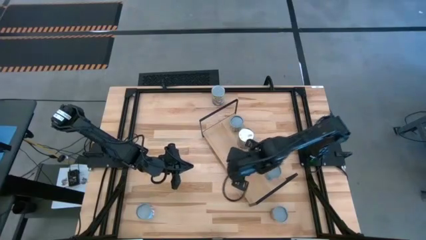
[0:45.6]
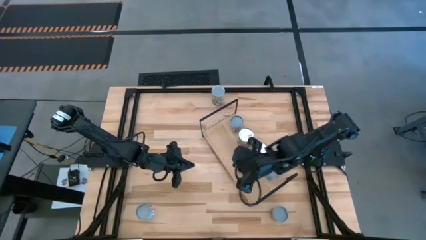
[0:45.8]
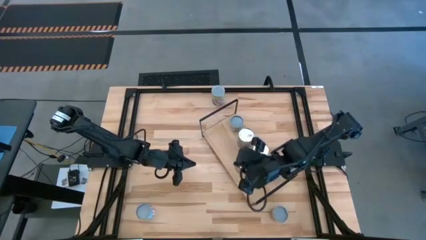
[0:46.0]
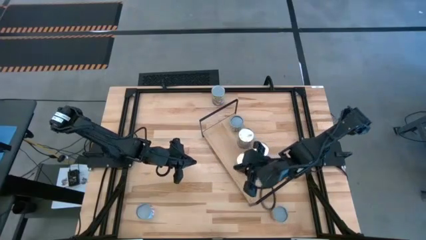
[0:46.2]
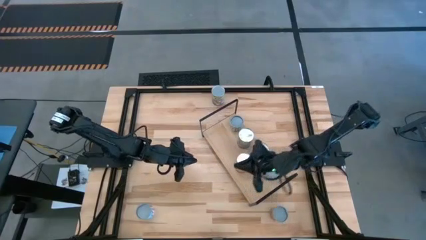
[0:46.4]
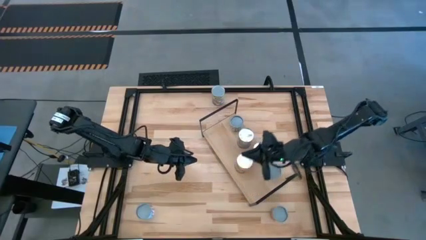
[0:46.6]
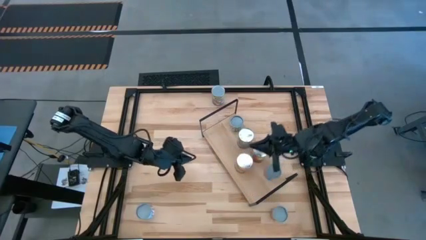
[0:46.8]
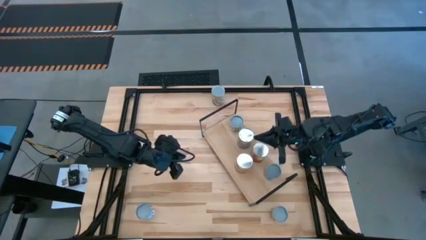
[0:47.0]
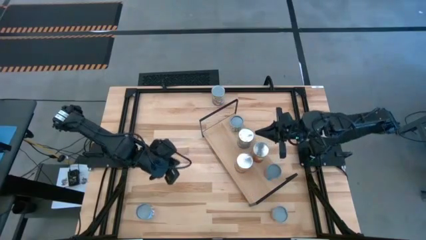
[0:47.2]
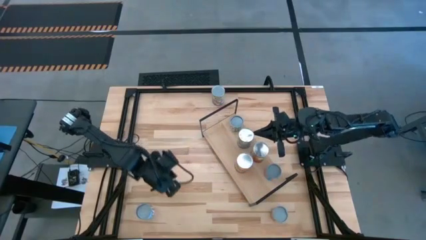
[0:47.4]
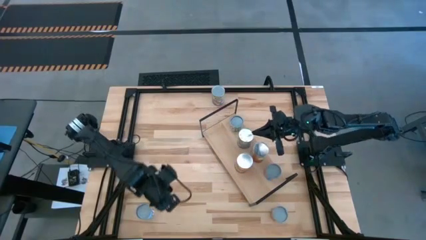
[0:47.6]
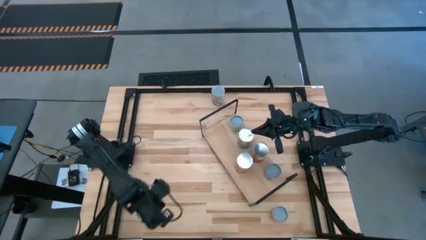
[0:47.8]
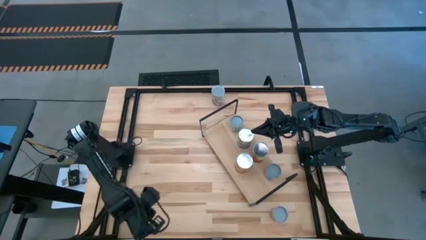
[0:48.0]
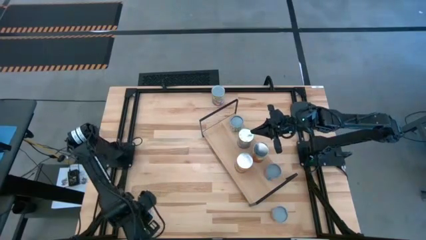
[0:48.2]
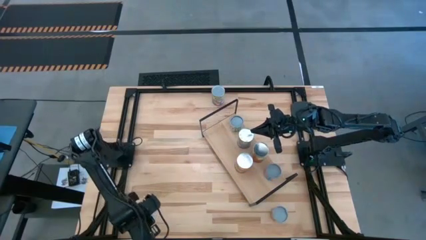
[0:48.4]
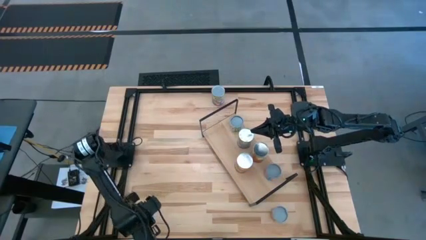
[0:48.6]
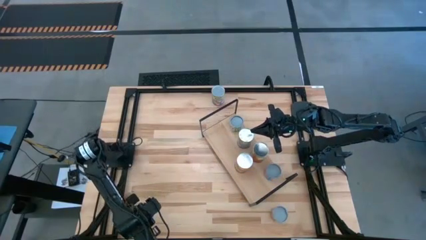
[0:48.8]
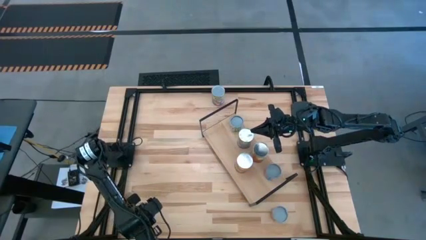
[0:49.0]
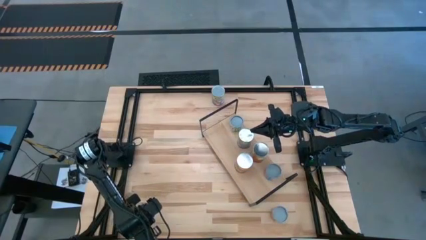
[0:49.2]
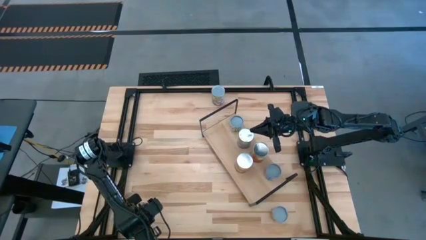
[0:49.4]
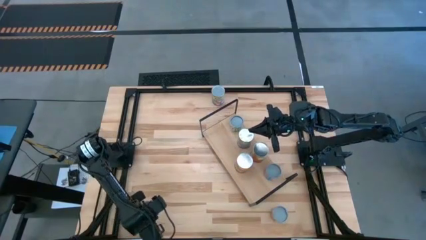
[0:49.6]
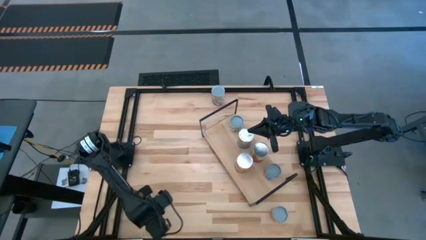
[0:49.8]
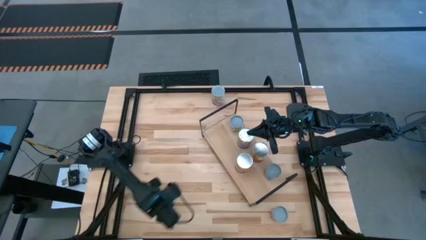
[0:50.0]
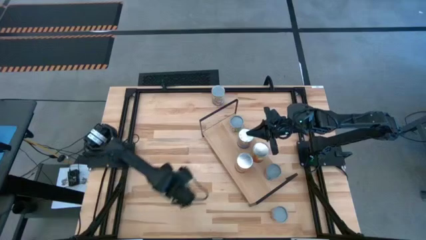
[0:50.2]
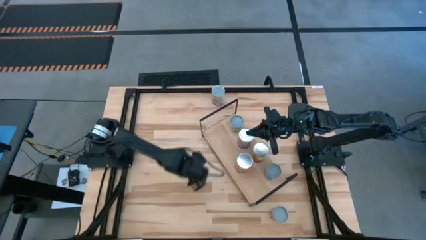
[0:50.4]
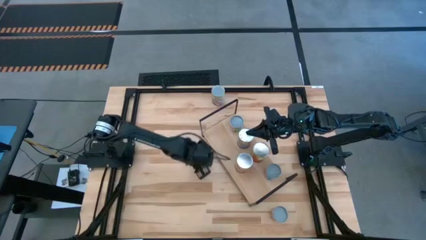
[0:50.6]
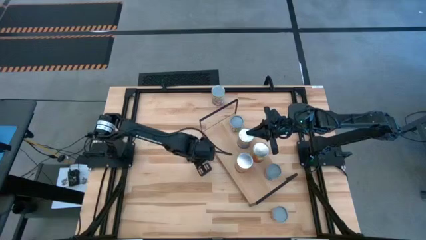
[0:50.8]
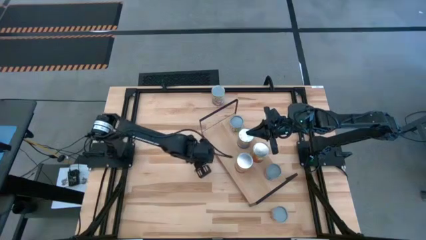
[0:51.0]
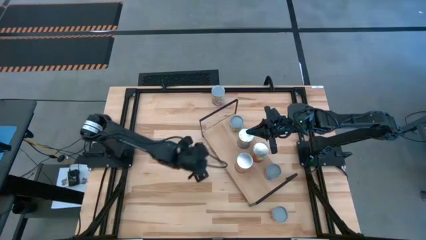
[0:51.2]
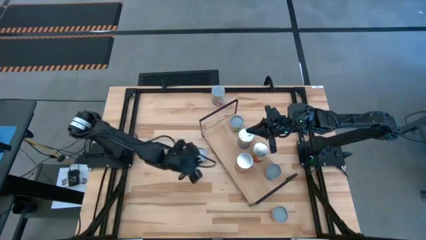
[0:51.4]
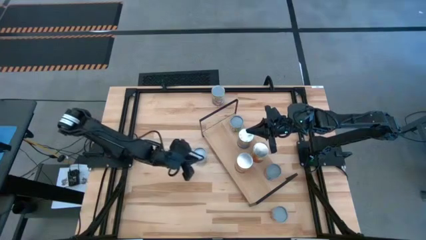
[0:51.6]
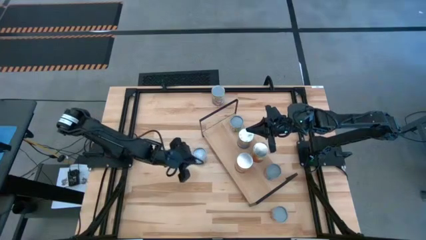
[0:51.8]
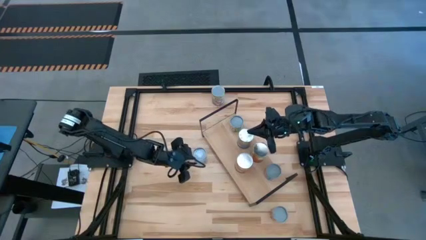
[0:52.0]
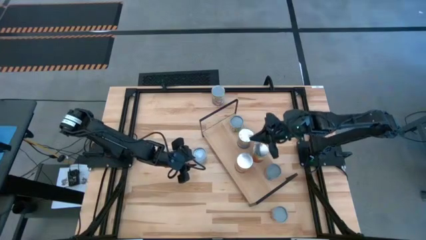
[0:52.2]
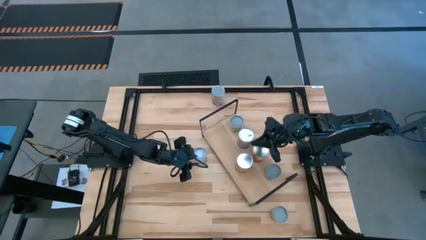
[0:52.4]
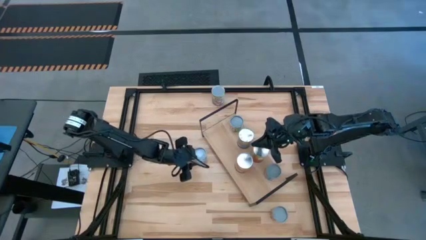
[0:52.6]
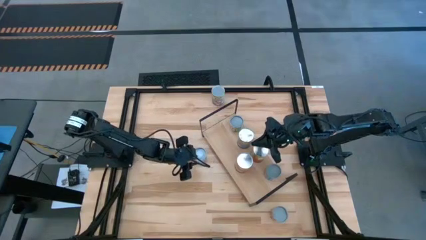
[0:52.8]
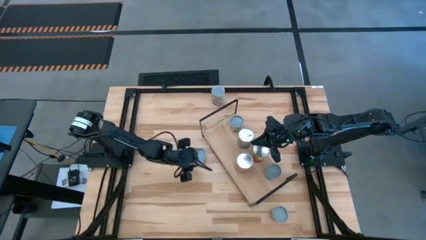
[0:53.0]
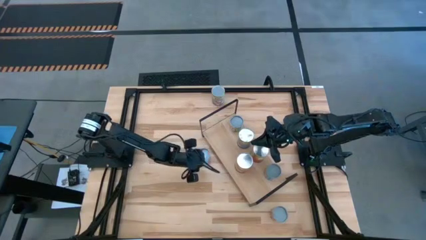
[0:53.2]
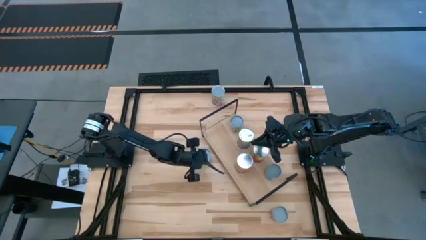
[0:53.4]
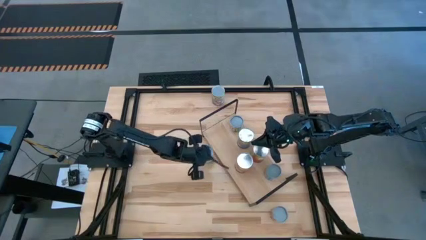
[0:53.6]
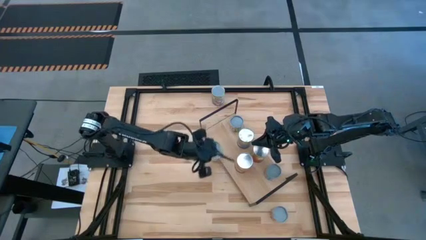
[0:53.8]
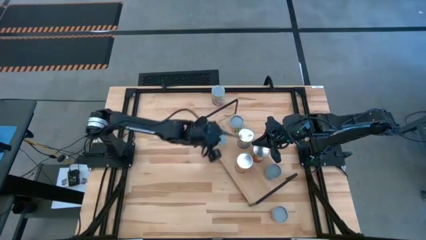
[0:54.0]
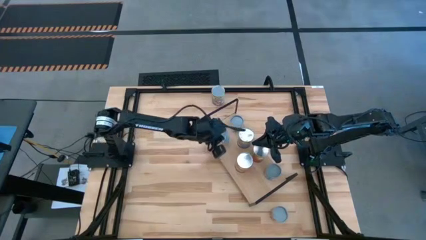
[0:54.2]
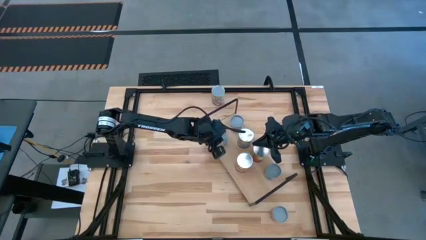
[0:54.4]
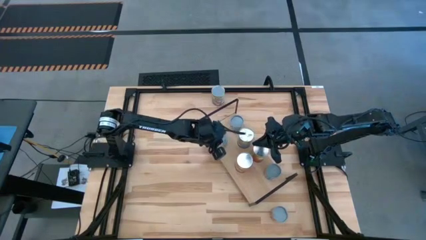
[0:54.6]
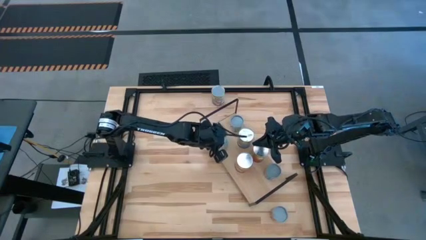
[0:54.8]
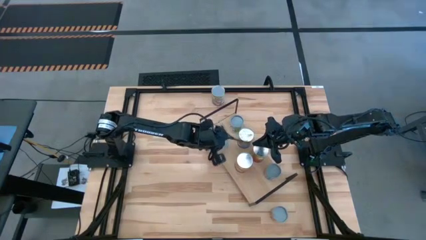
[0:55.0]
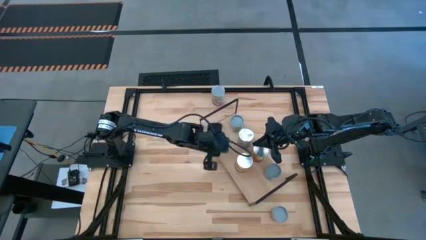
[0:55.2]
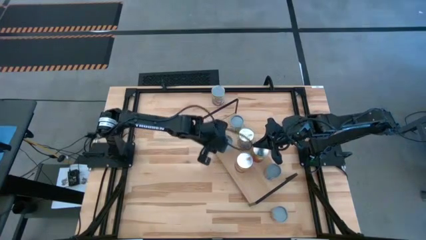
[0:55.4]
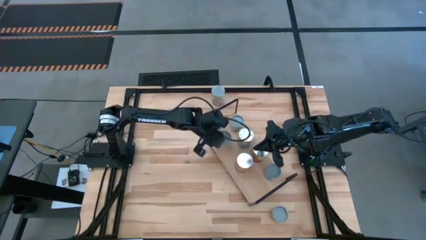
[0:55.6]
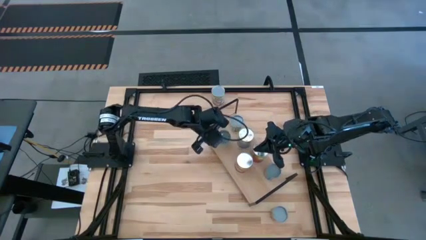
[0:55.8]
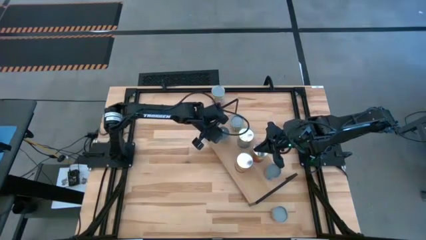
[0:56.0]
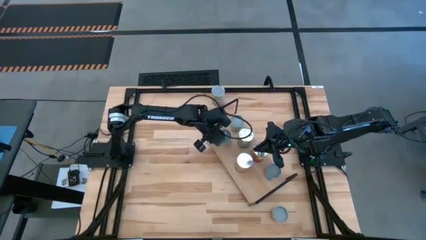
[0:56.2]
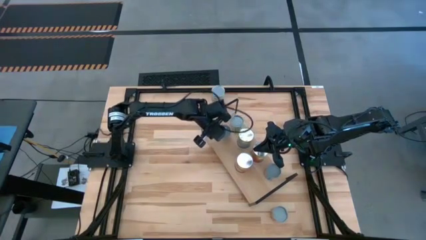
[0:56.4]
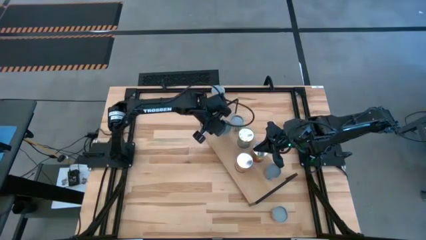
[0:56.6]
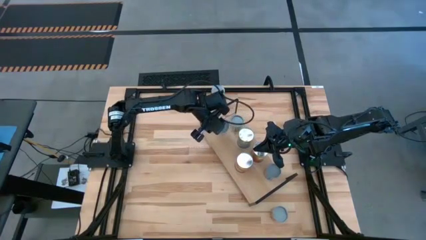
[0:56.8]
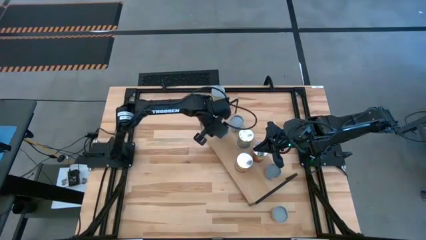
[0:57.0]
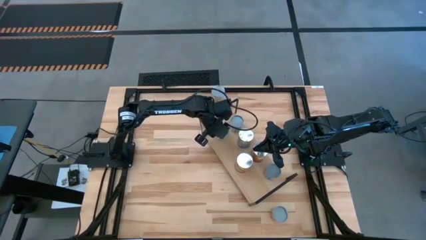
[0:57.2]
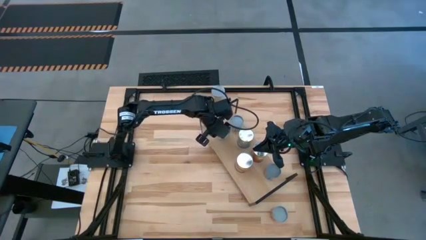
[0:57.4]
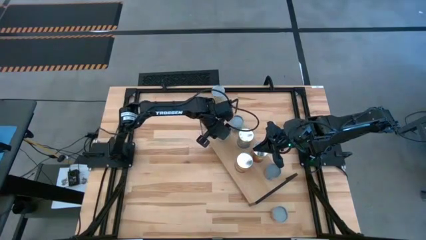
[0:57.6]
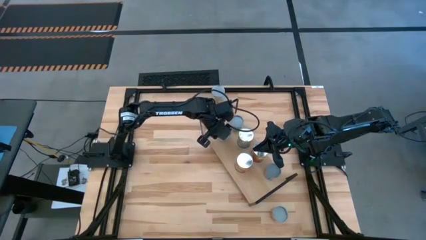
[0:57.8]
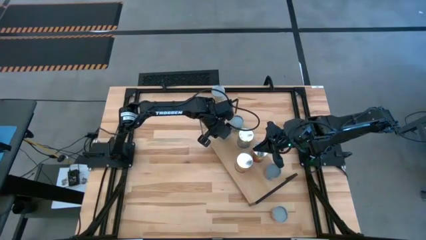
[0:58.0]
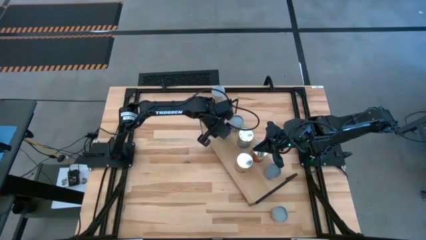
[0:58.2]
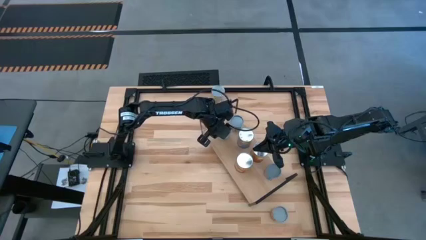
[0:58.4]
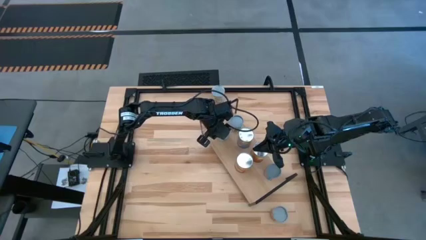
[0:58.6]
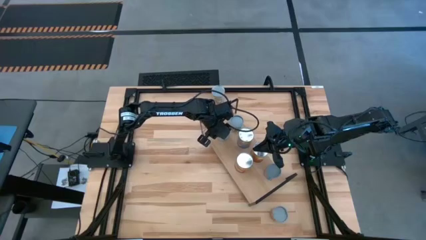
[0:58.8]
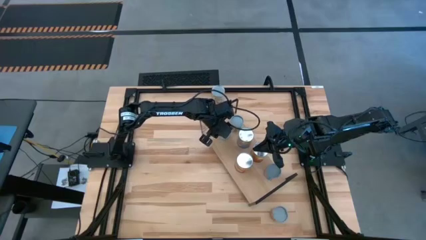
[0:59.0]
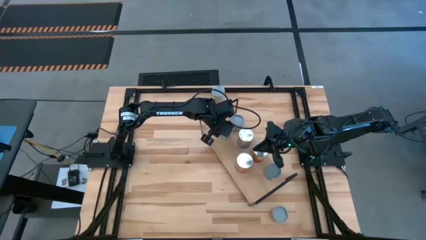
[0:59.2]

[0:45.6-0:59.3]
Task: Pick and place cans onto a shelf
Put the canned carrots on the shelf

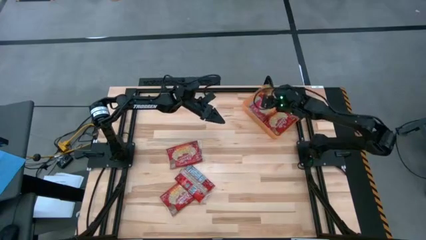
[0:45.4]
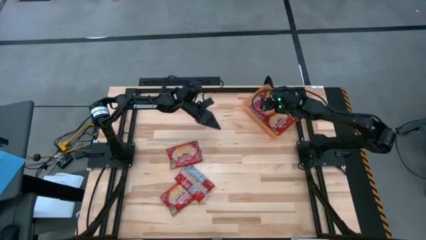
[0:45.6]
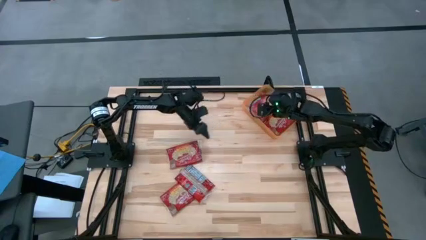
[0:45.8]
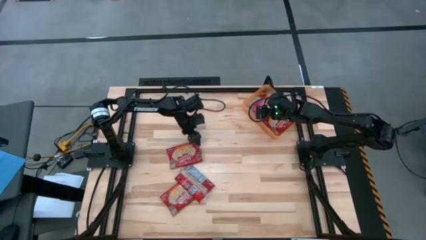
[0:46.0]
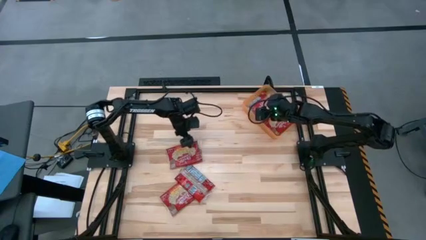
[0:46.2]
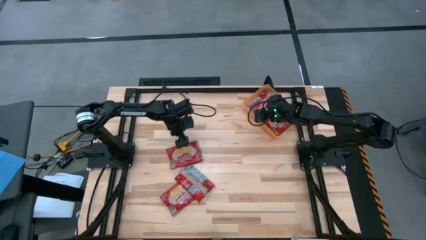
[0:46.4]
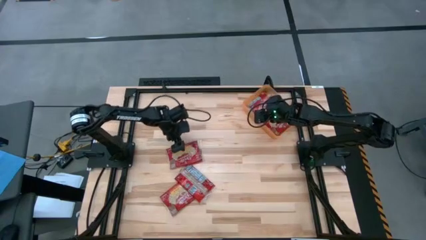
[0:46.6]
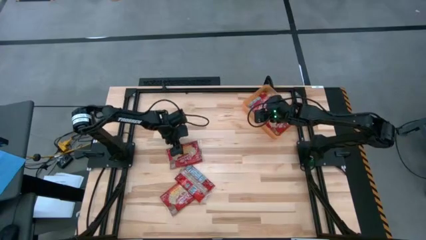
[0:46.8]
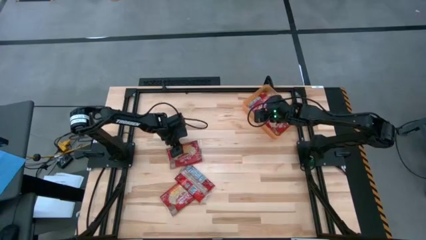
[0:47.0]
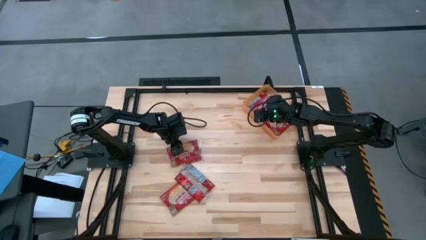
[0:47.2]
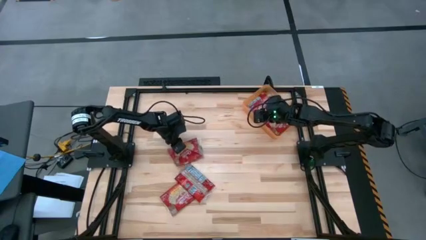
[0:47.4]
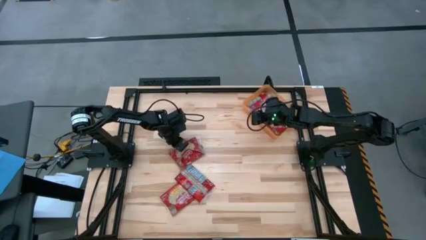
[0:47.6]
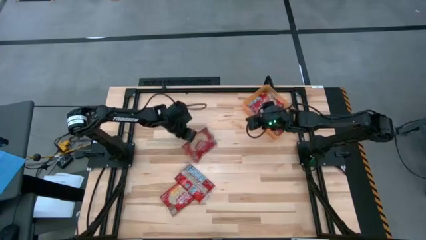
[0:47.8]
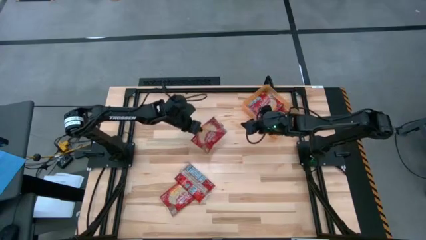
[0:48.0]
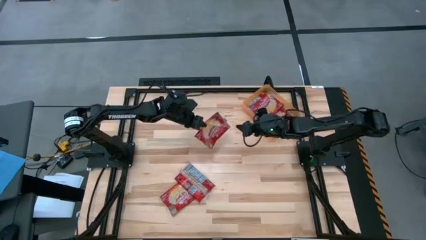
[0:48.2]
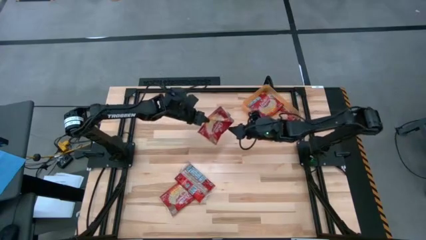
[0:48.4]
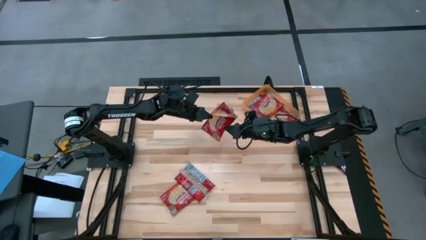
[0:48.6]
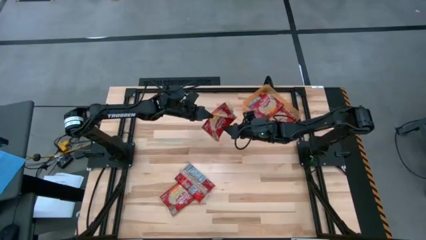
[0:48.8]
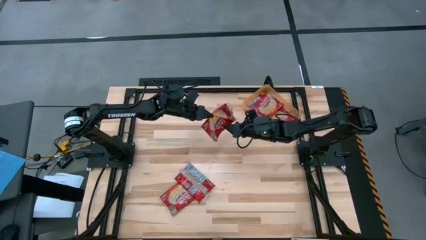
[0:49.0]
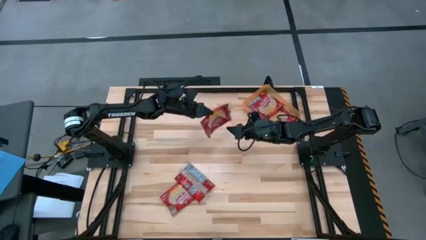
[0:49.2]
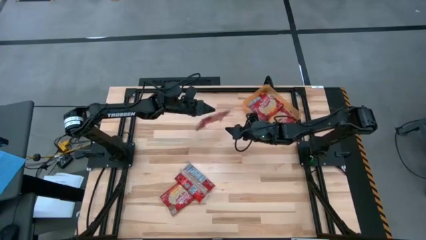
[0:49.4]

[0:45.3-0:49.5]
Task: Sort popcorn bags into baskets
Put the red popcorn bag into the orange bin
